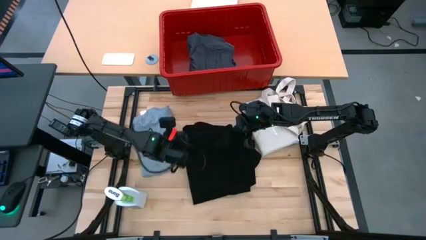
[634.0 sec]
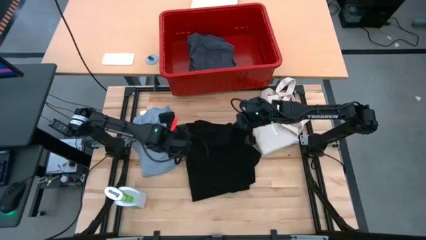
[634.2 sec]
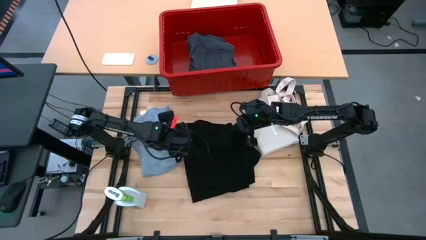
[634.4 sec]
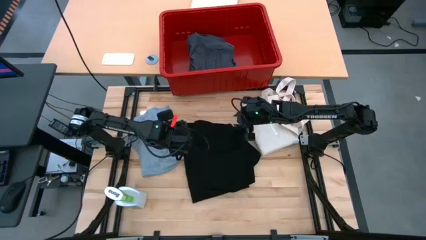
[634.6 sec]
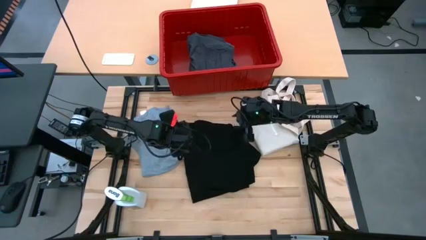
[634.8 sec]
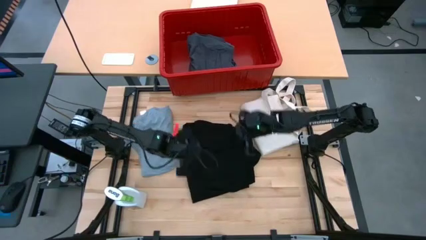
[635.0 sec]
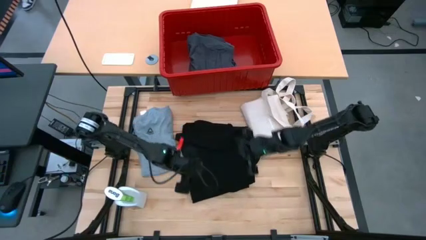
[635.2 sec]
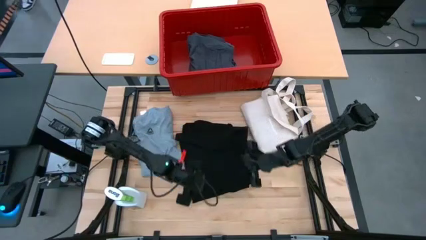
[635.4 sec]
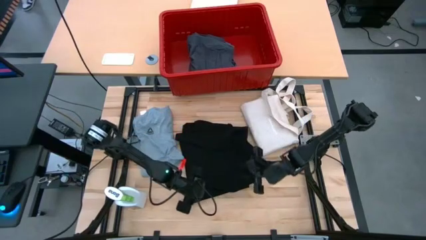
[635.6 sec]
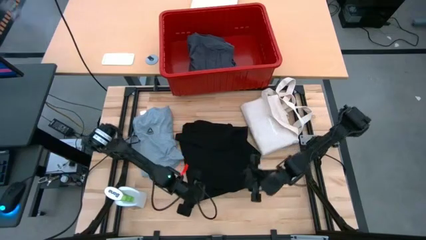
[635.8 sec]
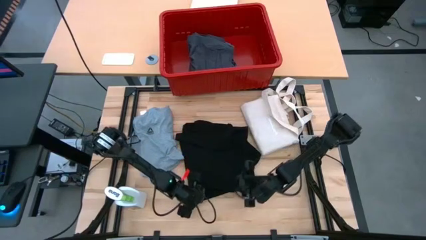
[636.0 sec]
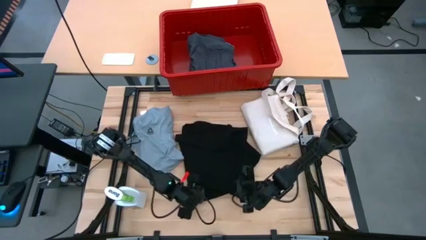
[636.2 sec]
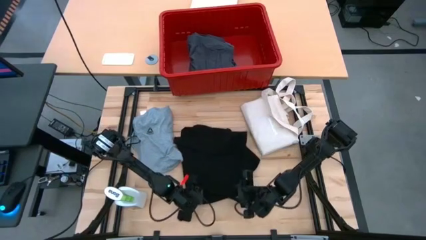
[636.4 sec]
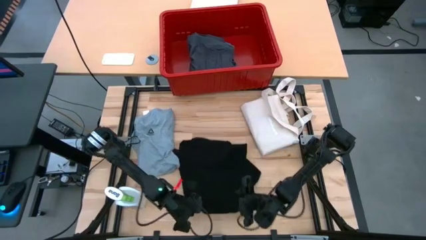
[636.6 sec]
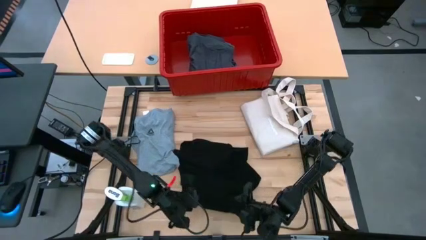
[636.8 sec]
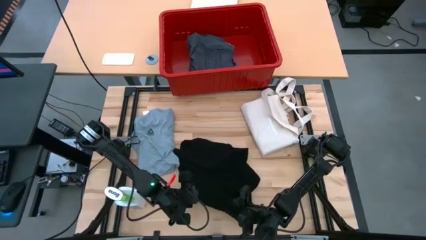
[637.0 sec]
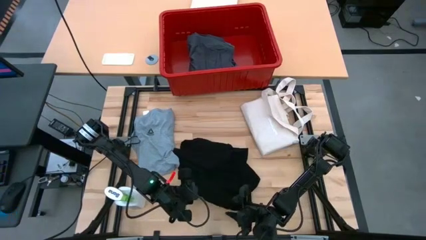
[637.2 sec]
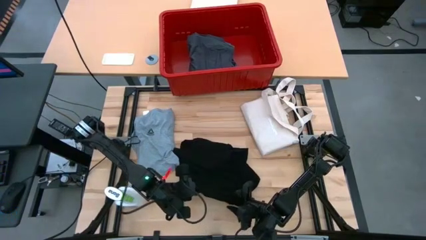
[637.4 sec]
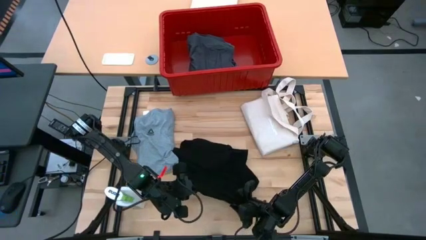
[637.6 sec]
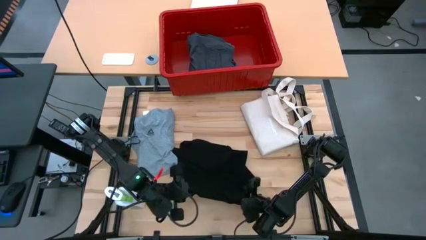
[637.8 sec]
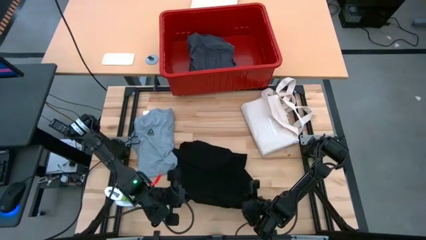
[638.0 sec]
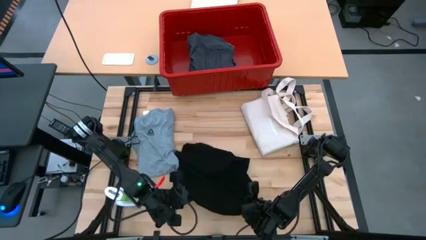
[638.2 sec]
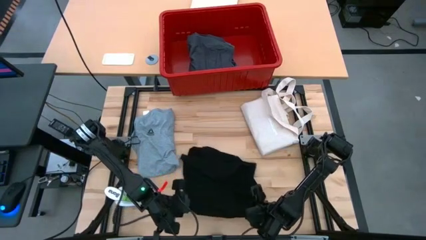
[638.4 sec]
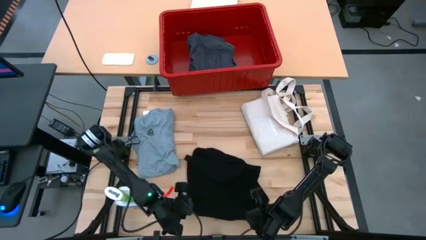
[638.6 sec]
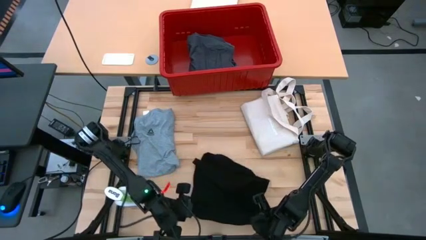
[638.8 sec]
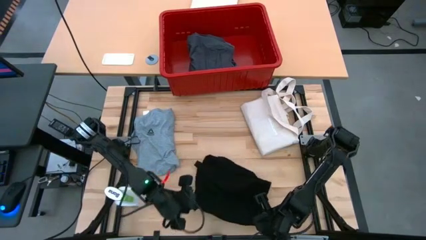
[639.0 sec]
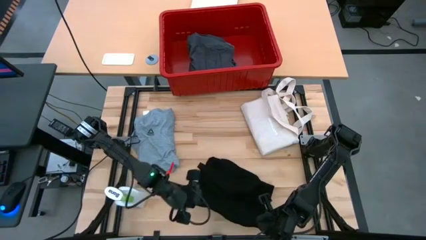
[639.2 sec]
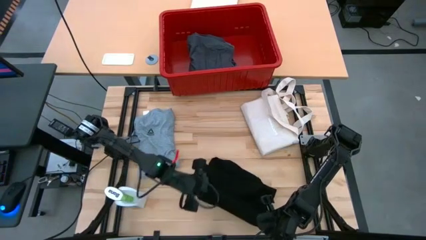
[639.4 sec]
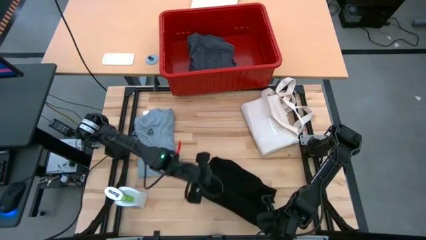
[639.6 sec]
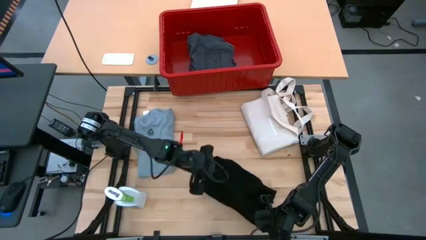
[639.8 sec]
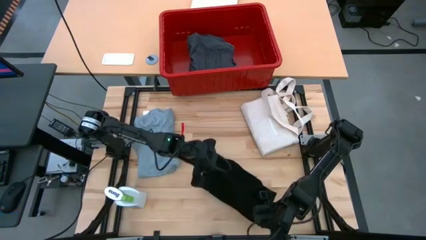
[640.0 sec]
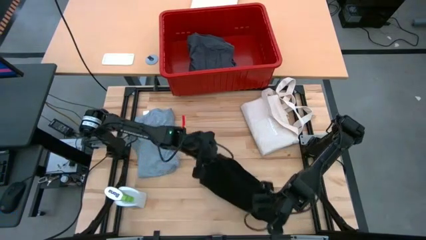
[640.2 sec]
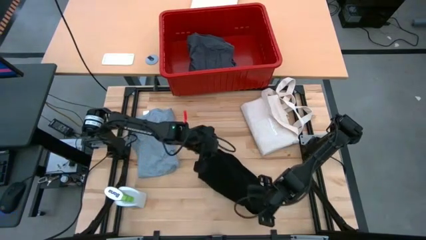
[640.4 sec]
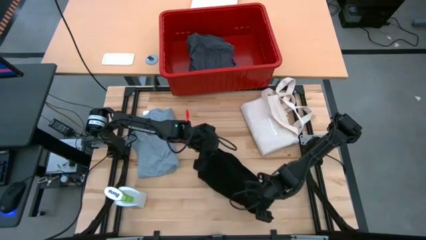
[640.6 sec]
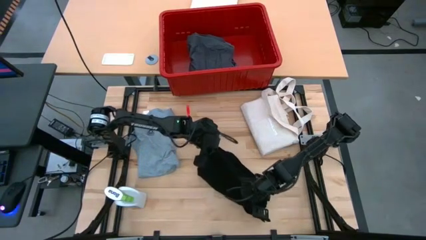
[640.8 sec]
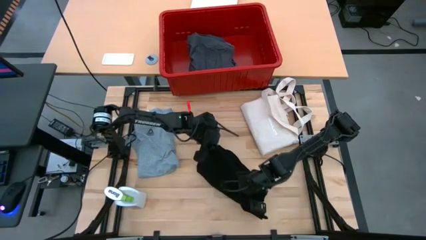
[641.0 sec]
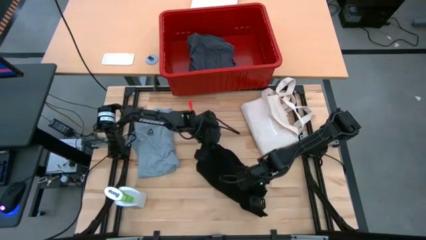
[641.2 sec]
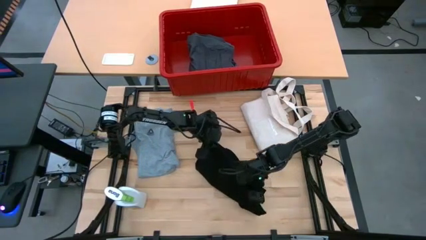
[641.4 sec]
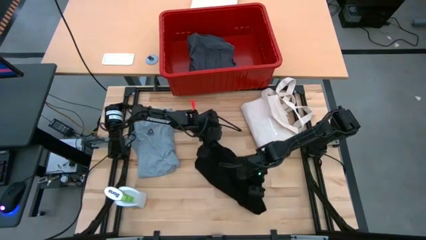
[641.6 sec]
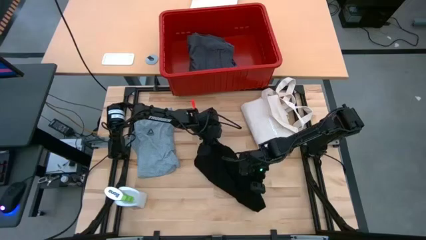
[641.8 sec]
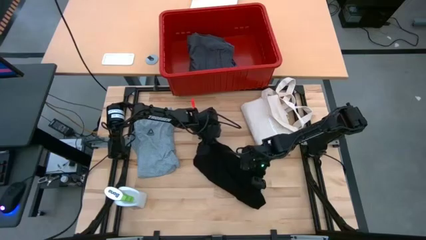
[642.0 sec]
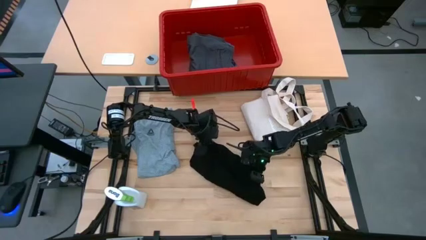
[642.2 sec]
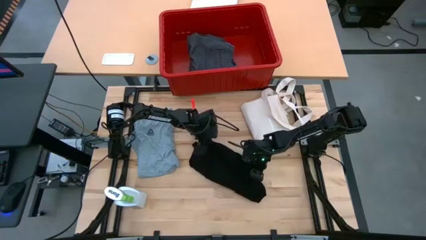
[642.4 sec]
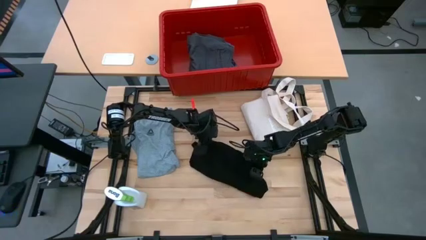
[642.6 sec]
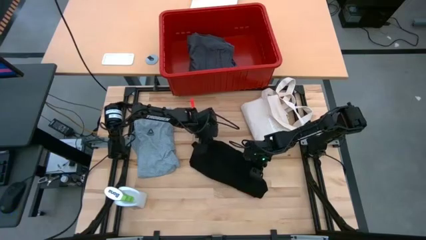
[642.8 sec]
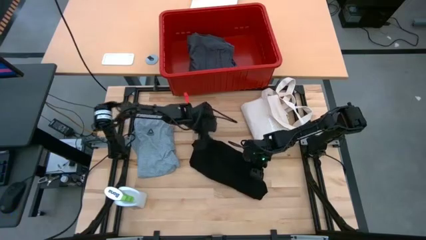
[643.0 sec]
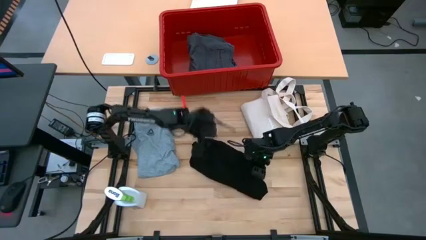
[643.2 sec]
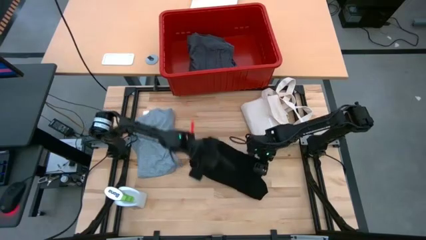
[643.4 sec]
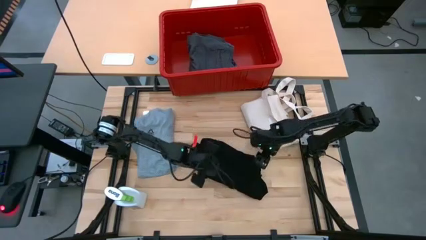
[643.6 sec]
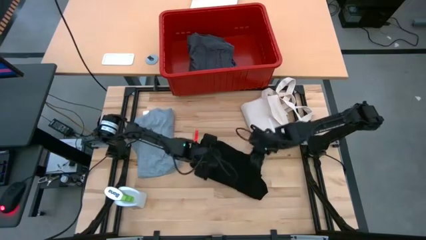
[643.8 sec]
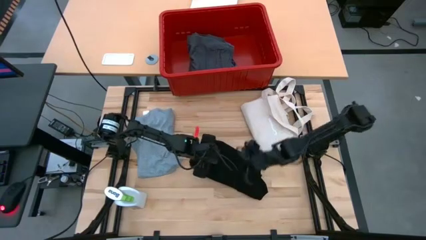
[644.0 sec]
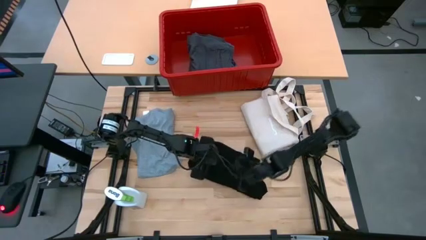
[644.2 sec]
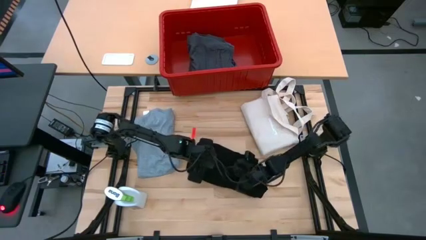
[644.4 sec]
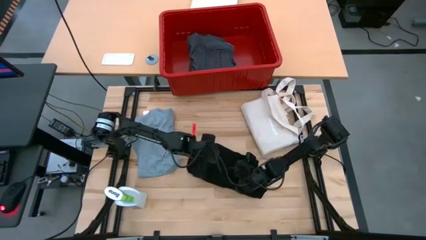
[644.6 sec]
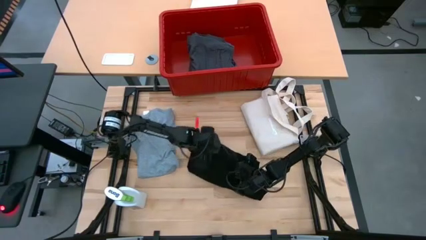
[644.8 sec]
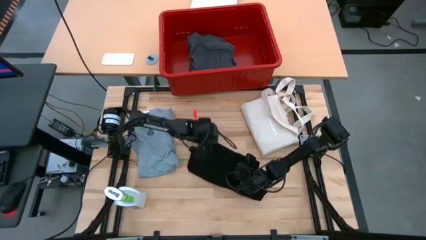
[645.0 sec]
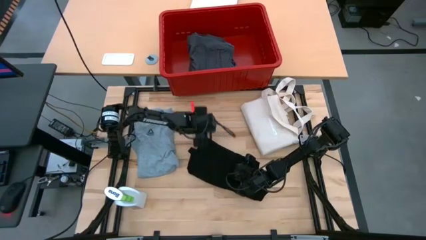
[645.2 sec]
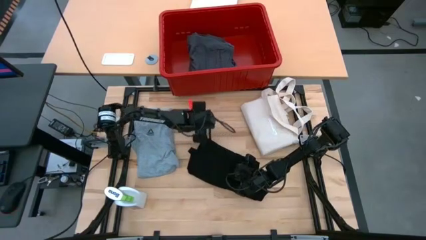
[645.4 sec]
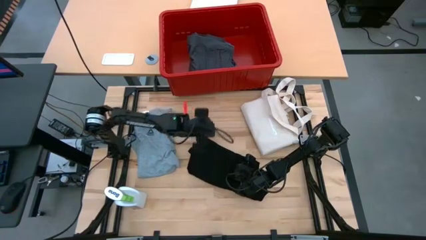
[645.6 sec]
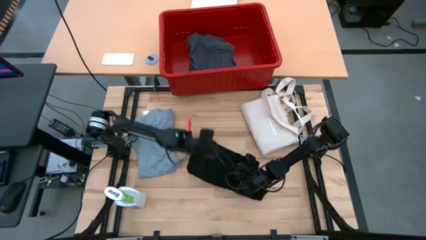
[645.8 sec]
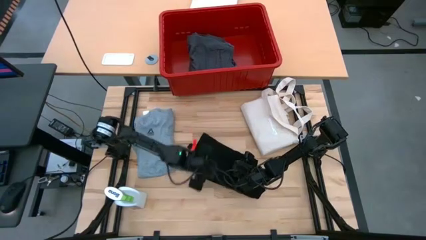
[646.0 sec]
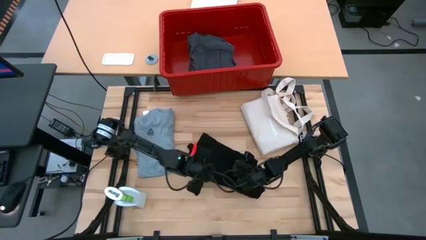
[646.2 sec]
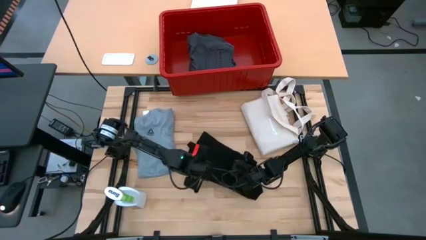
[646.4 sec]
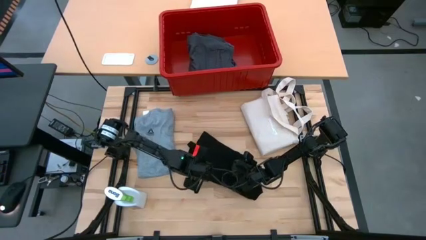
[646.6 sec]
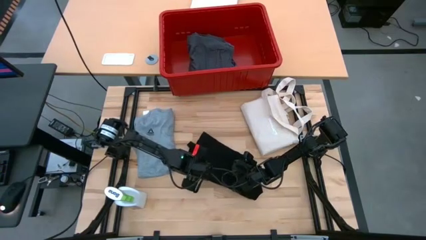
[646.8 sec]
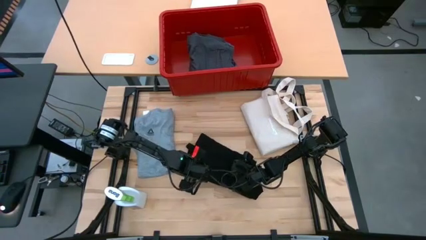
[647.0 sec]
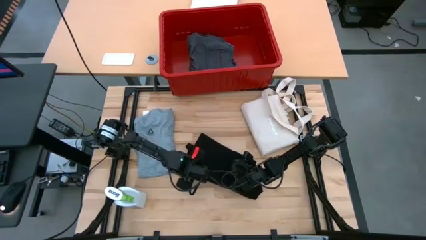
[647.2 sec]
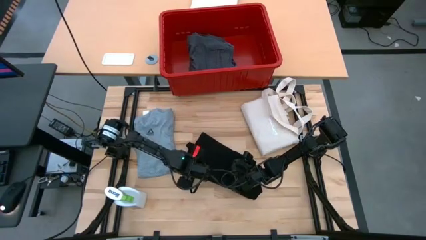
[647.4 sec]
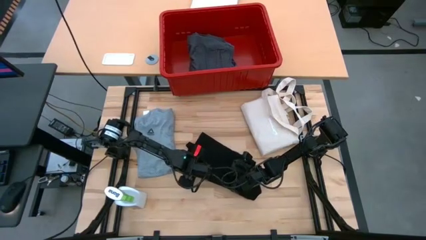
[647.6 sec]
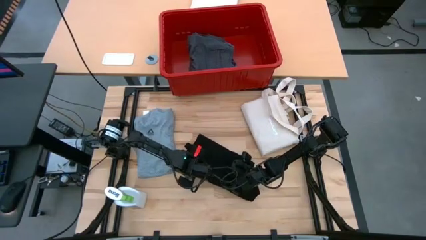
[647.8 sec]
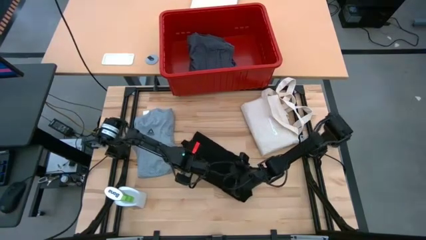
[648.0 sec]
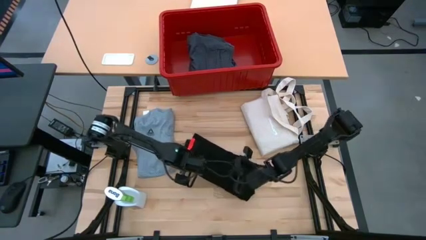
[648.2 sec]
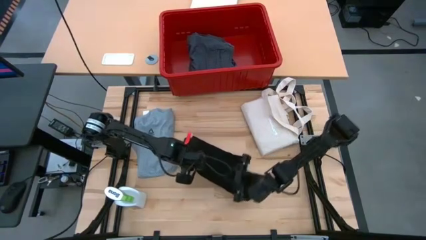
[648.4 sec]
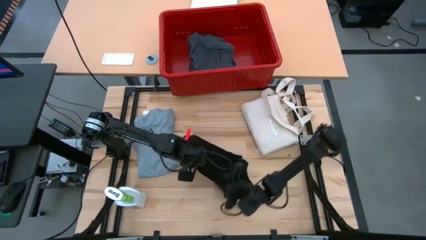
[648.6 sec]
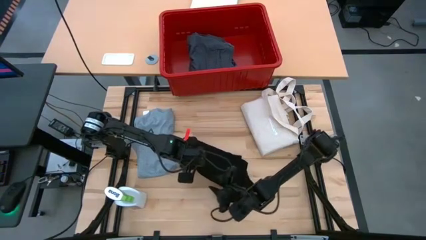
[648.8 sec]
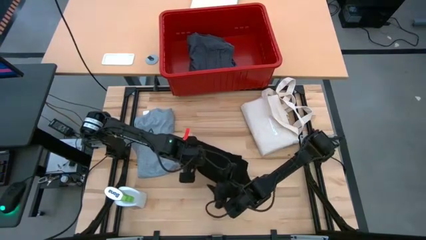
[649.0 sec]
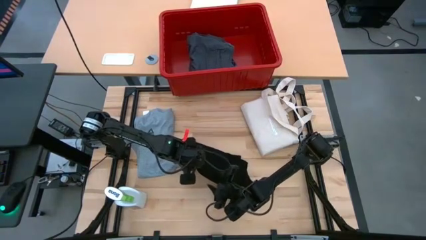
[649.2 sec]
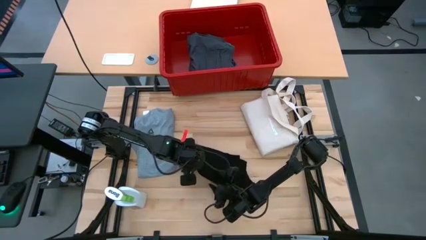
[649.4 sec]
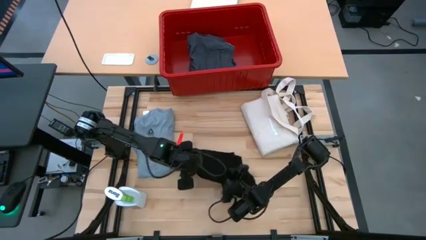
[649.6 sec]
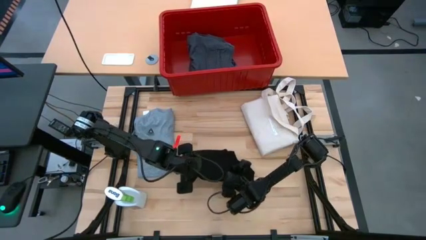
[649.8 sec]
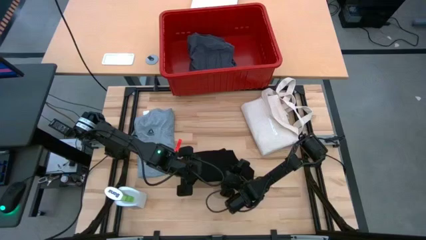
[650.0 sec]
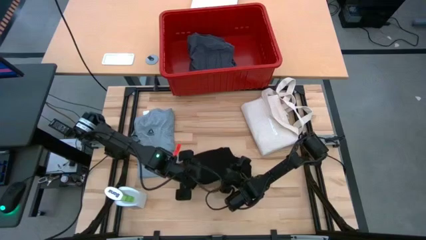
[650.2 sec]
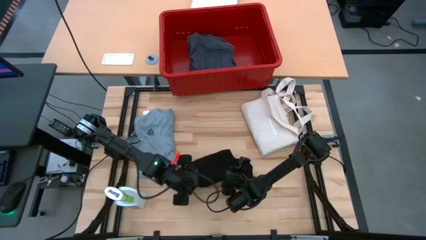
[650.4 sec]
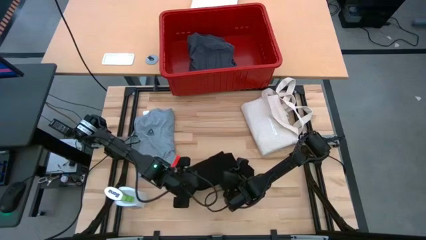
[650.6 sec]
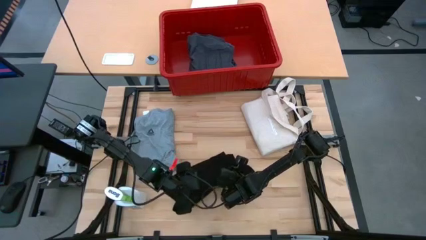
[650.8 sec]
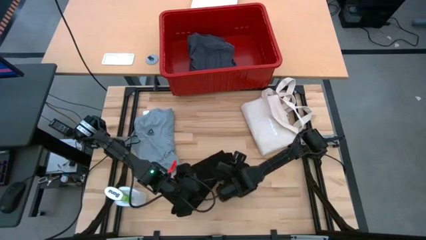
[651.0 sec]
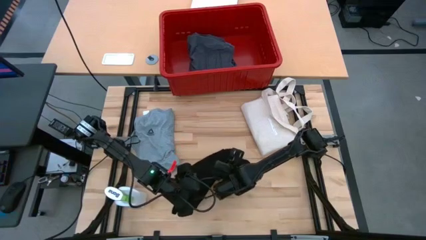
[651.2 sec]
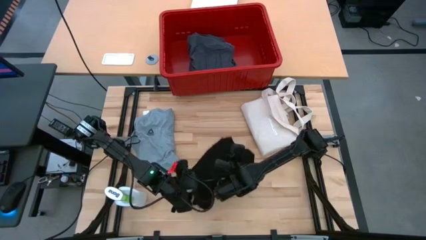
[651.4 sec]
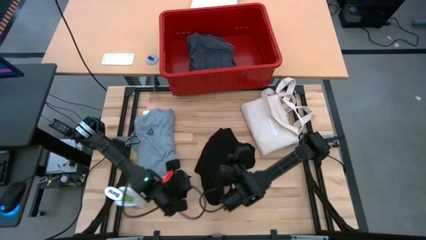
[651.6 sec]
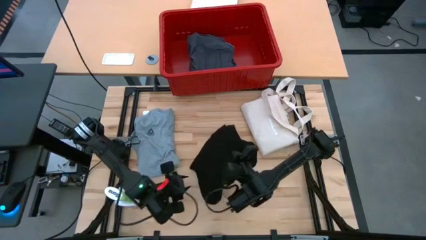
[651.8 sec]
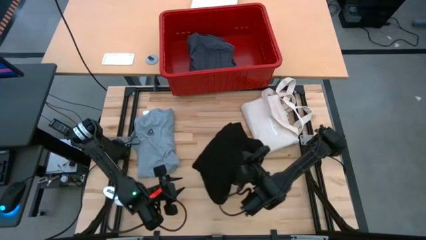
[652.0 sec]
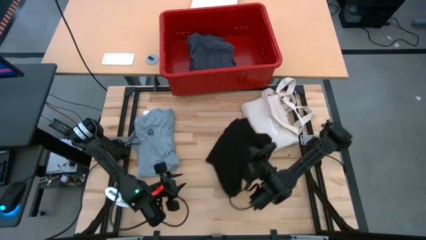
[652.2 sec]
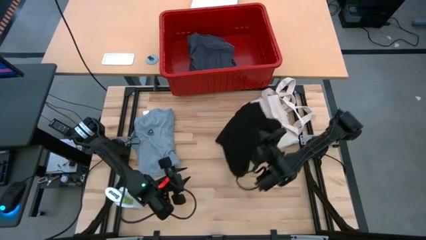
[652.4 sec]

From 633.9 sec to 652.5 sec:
Task: Fold Laundry from Bin
Fold the black shirt
